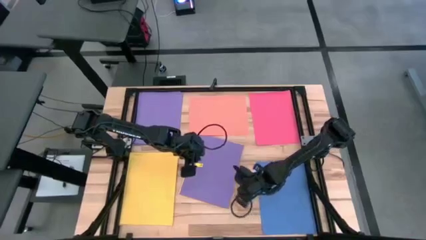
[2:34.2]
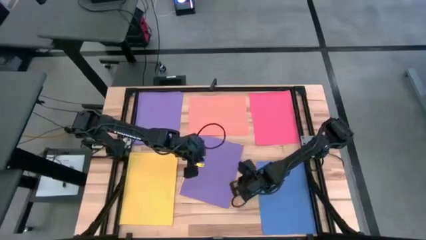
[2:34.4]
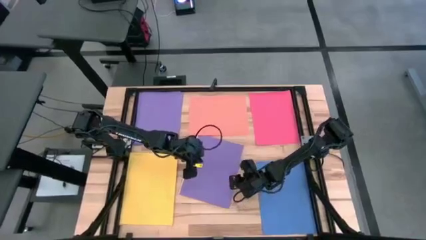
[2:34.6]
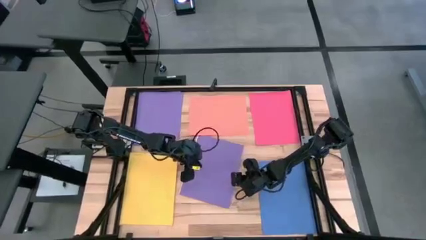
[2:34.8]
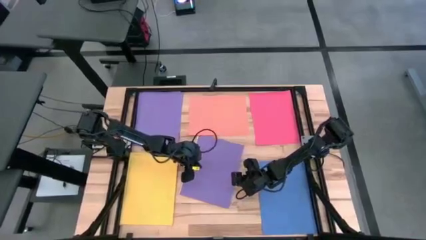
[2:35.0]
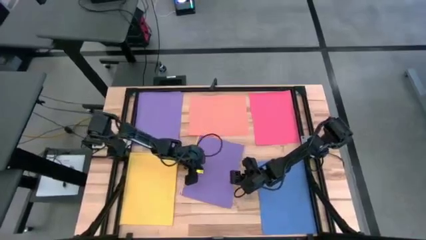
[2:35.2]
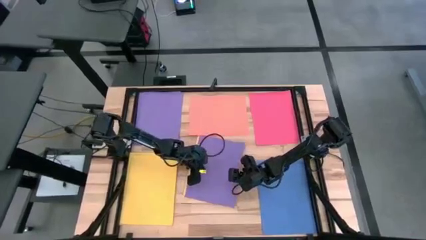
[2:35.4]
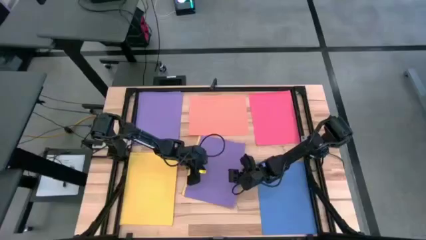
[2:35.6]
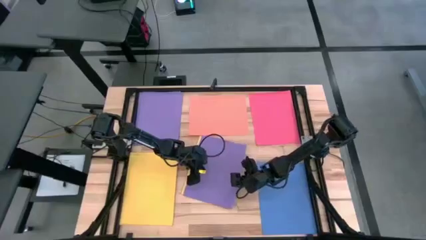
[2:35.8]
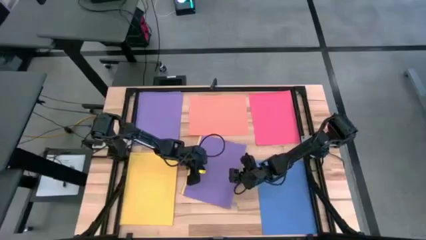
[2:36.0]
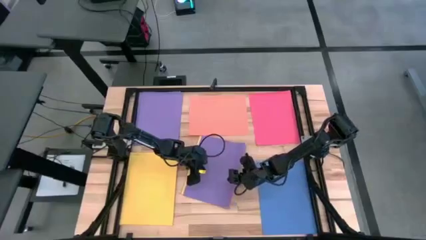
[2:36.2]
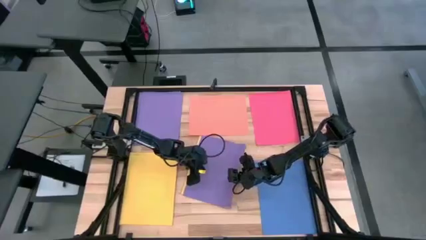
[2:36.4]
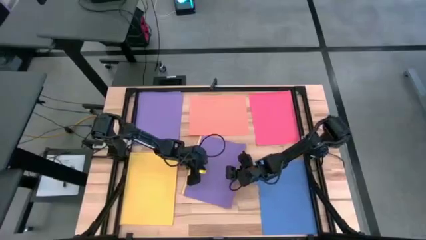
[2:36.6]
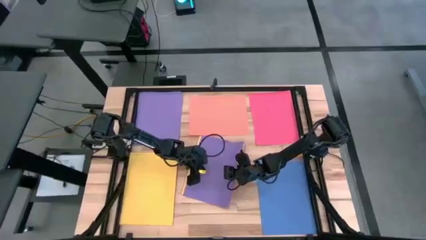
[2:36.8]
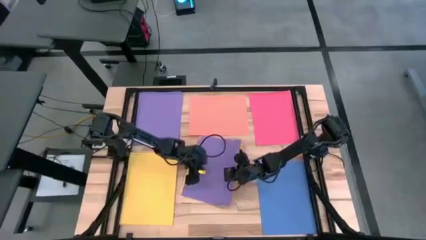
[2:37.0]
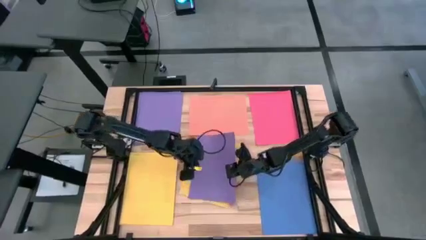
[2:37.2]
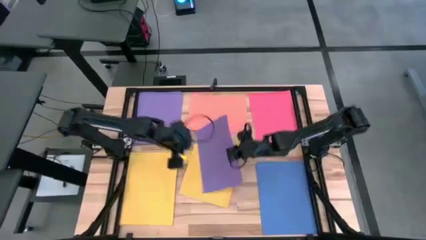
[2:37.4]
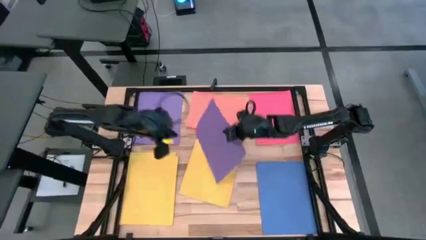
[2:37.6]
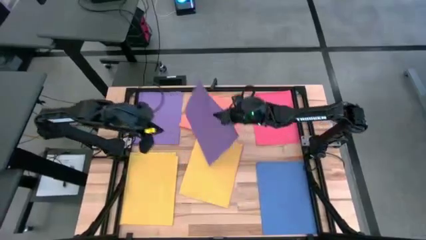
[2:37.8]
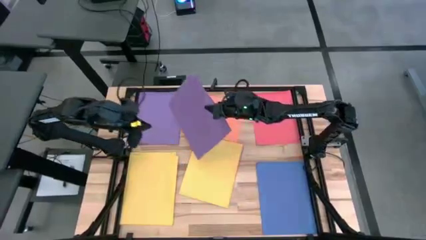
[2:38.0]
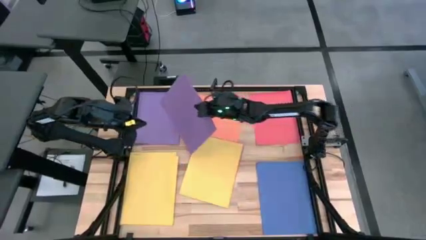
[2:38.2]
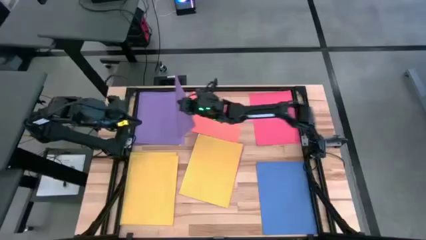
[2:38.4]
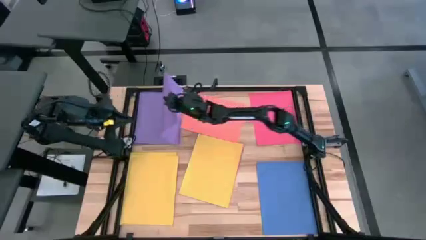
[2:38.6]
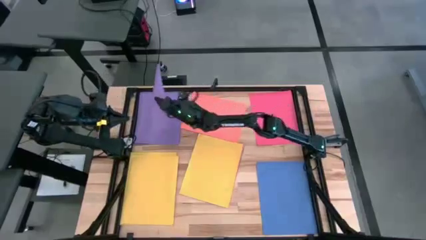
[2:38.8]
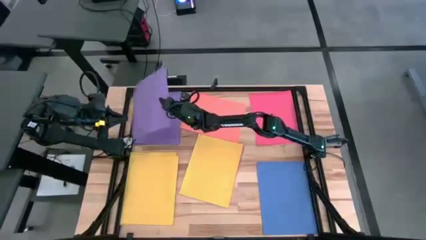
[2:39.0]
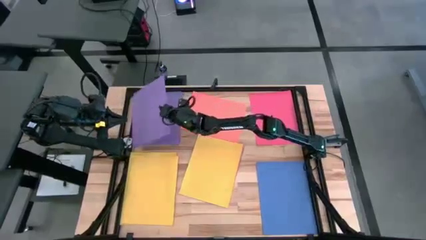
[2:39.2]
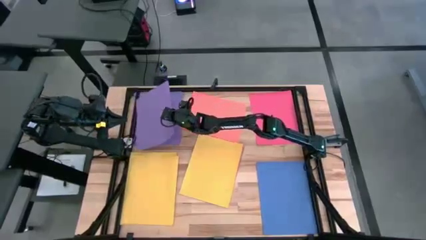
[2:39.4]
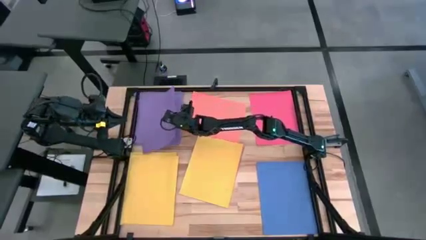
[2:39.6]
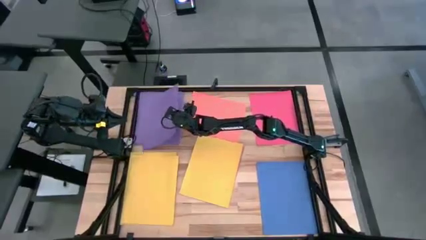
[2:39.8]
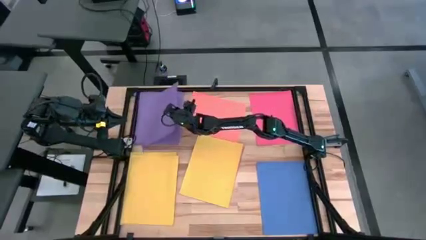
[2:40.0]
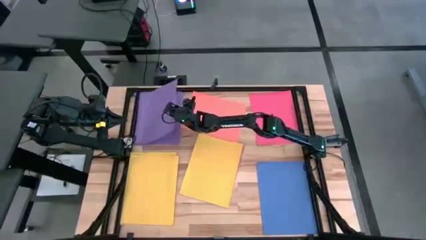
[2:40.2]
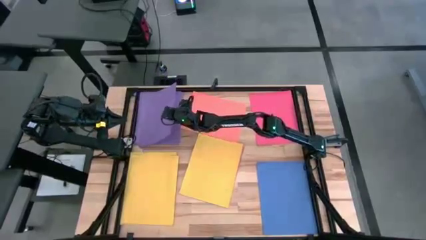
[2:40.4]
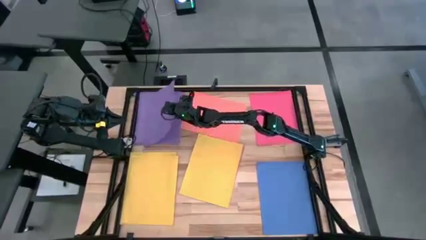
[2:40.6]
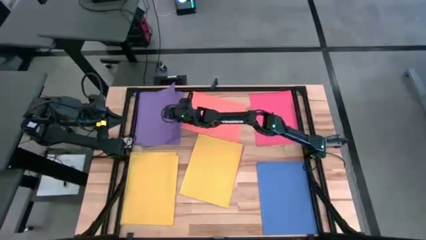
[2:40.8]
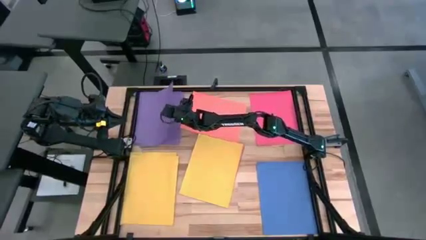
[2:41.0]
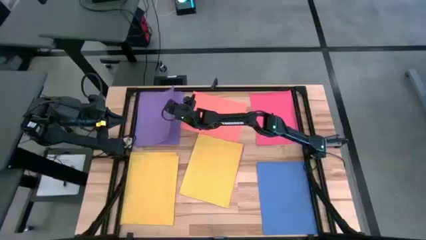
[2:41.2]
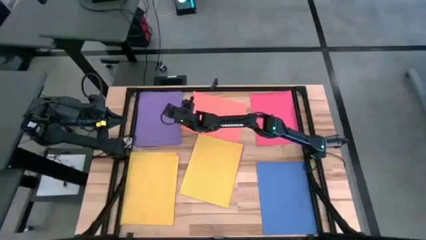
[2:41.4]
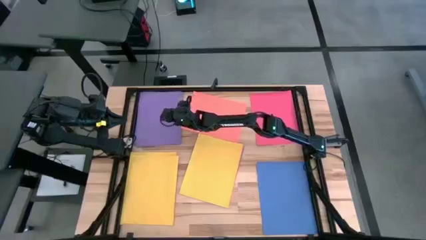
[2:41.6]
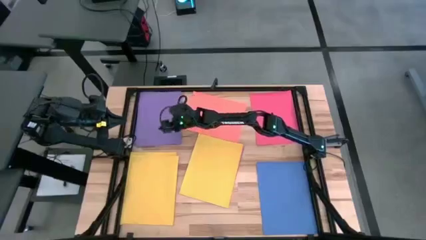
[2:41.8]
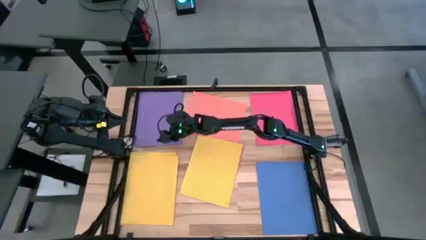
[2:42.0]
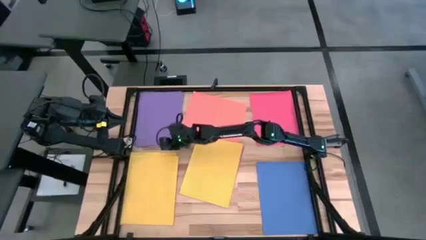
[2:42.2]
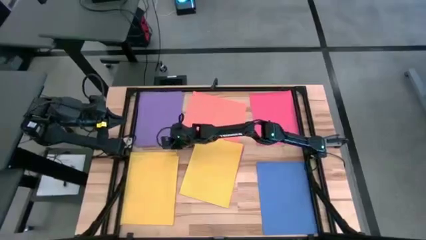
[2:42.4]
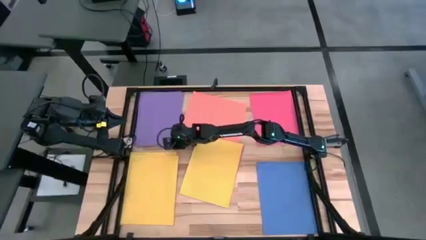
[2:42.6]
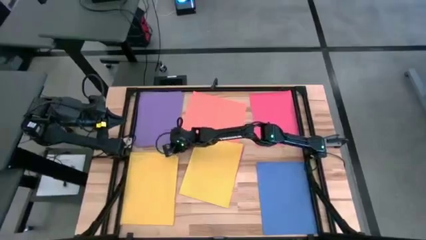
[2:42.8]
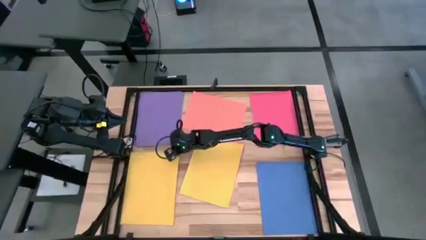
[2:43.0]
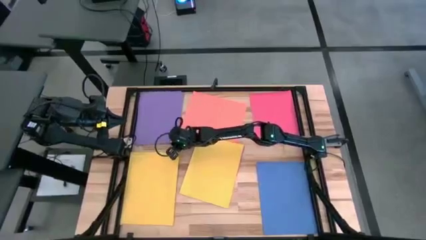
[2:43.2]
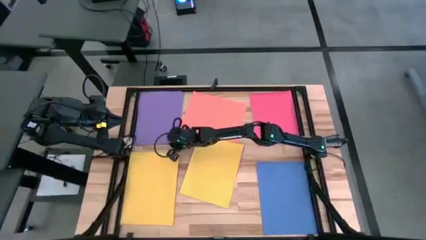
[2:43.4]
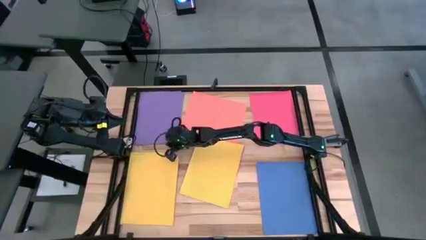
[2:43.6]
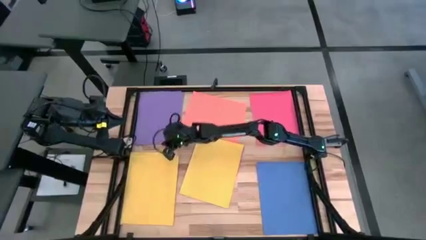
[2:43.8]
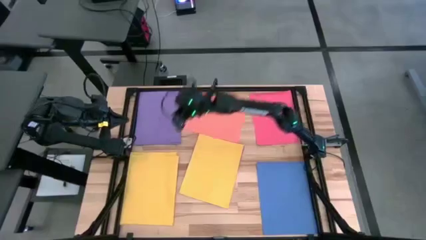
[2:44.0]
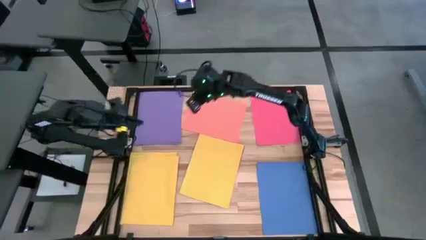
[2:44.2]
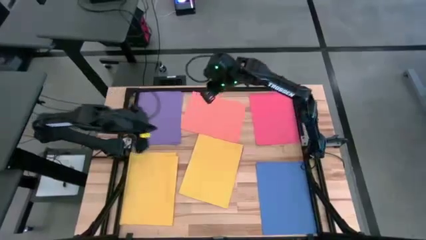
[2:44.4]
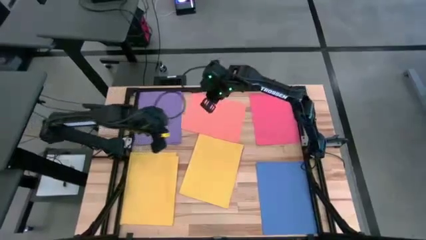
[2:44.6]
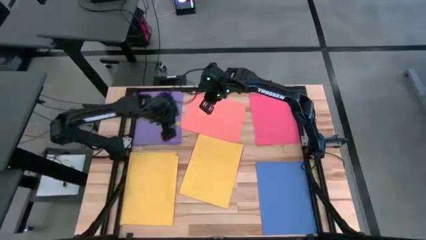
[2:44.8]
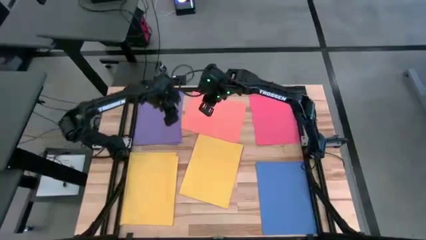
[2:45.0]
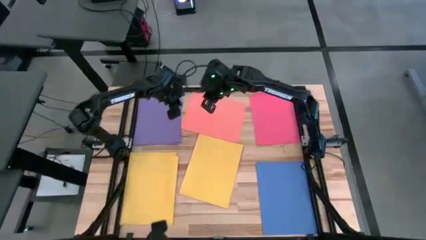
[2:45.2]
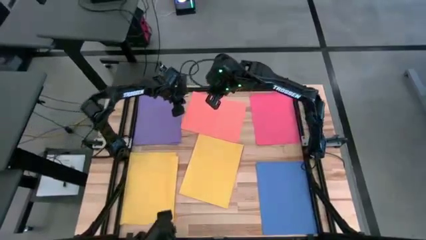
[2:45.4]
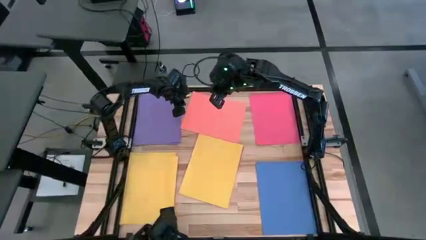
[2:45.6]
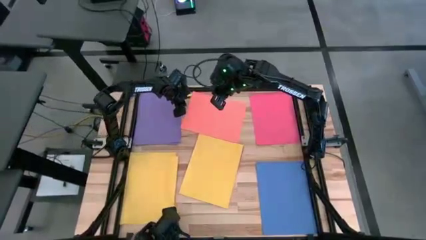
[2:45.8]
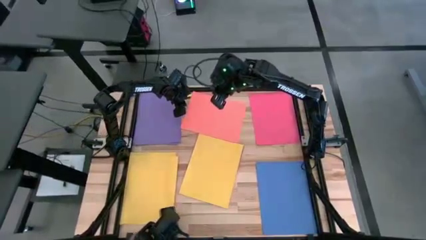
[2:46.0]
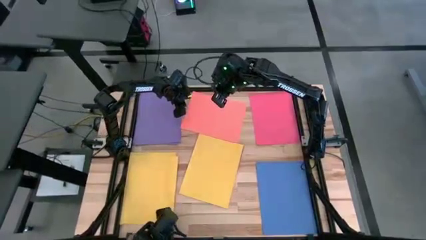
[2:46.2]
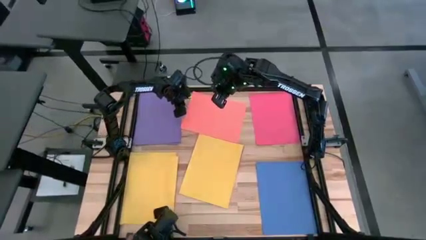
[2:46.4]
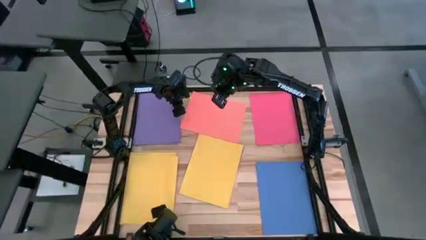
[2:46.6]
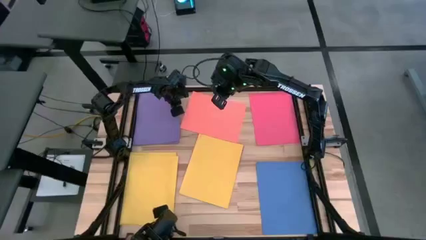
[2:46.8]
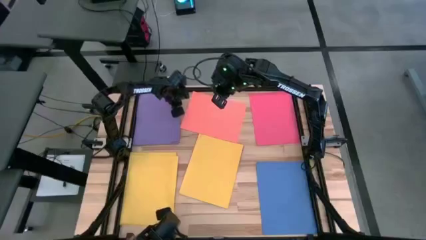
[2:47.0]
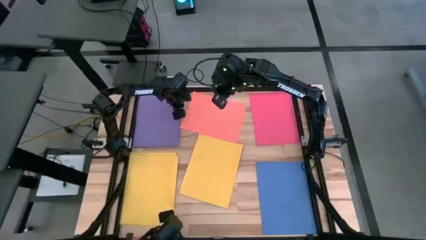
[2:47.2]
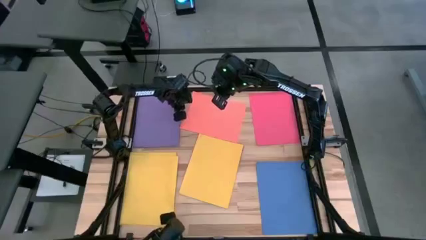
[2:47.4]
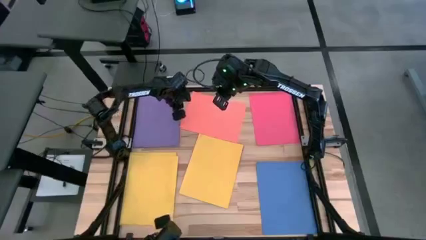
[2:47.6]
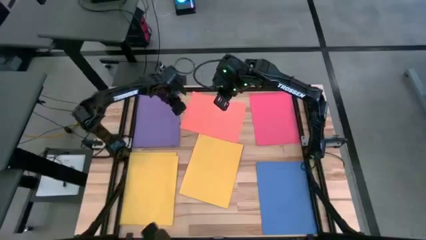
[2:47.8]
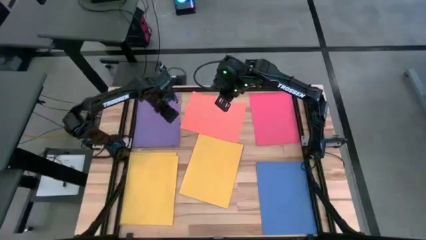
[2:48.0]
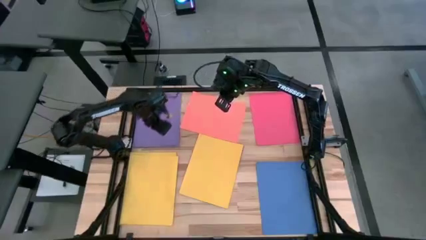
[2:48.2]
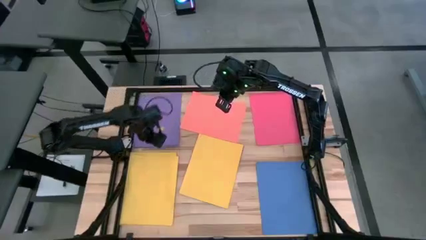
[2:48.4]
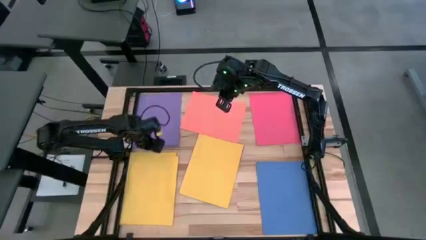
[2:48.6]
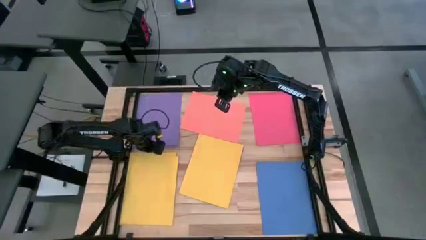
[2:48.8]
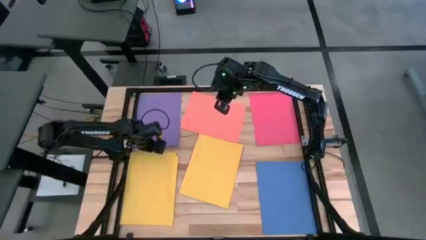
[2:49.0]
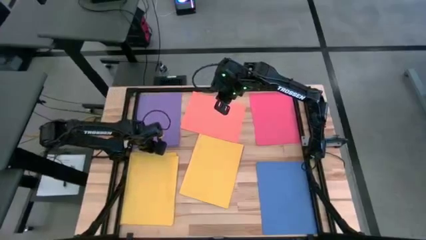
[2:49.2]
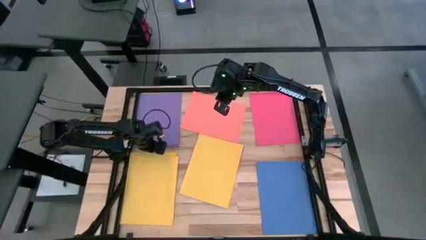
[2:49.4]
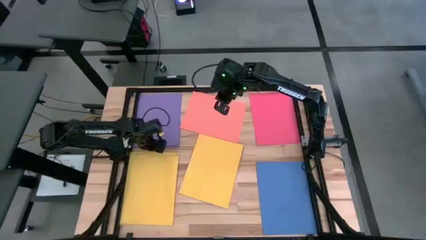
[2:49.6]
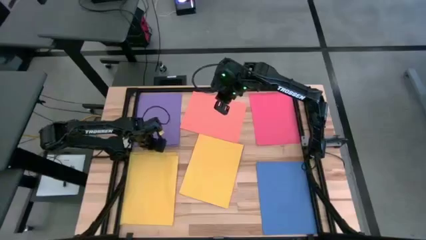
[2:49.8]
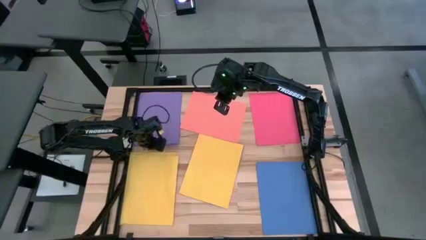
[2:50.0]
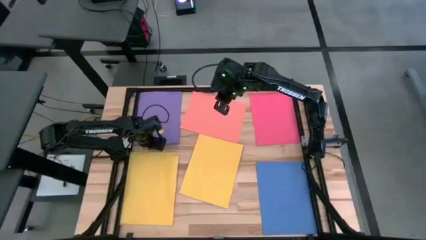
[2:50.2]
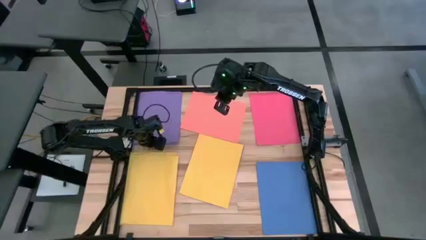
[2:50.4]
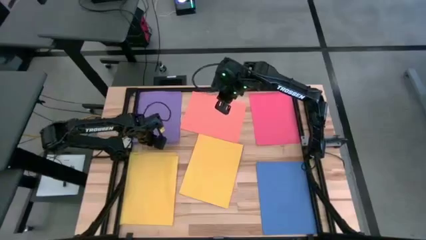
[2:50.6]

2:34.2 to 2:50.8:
Task: Organize paper
Stack the purple paper on top of the other purple paper

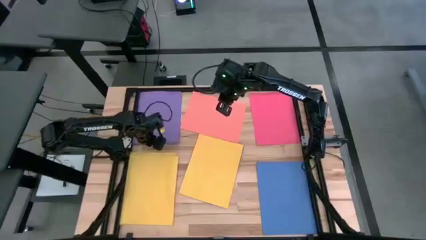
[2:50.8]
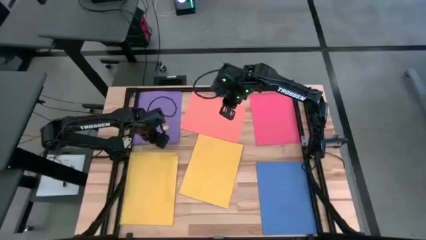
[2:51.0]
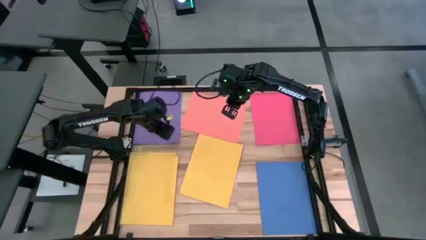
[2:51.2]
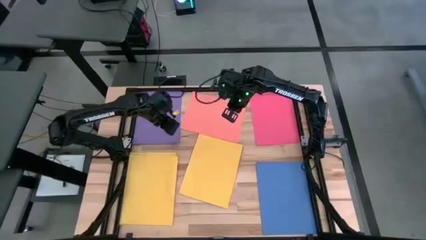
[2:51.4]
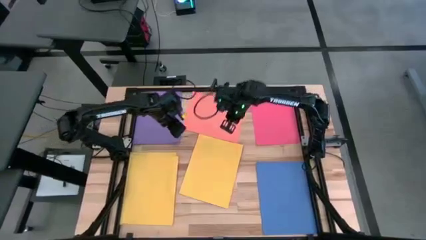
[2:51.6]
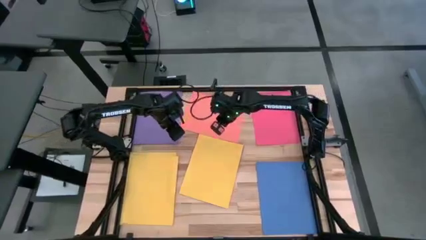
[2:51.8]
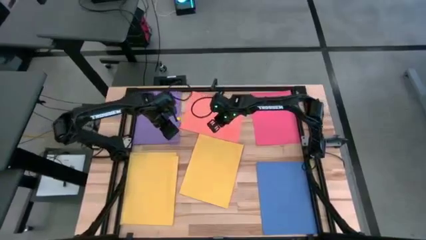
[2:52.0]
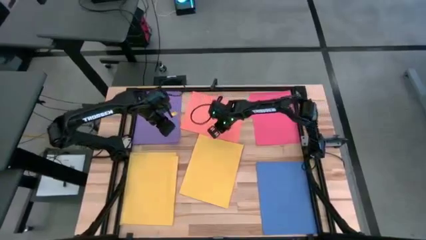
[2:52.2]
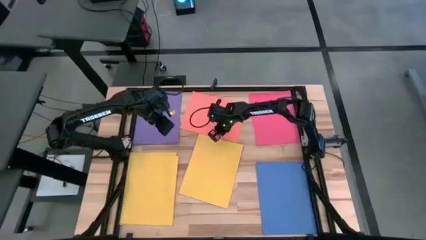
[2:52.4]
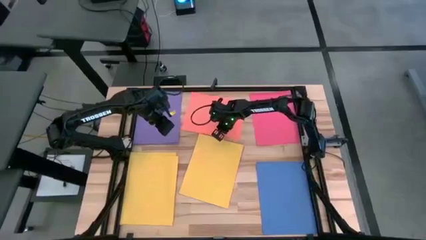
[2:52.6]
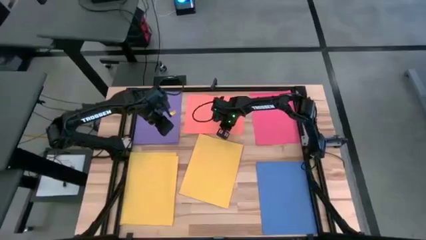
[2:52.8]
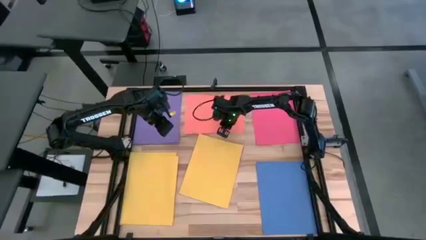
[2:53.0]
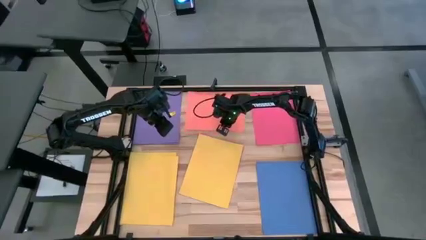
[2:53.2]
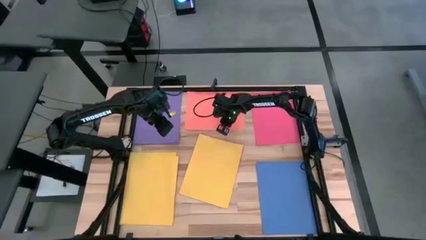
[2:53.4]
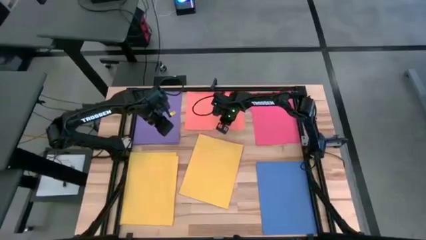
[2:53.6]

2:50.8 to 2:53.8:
Adjust the orange paper
